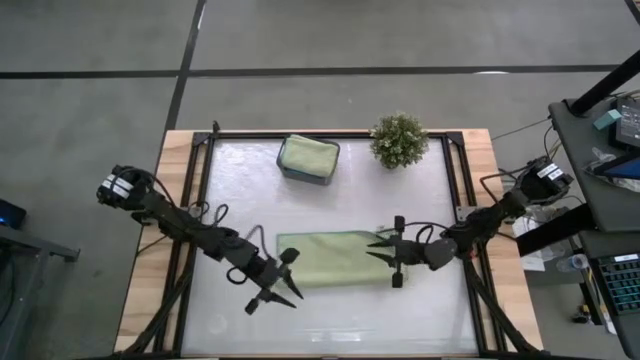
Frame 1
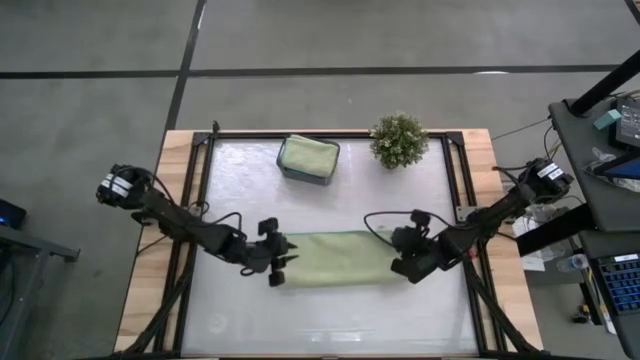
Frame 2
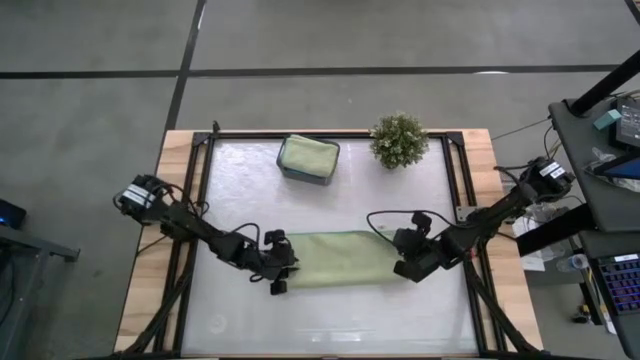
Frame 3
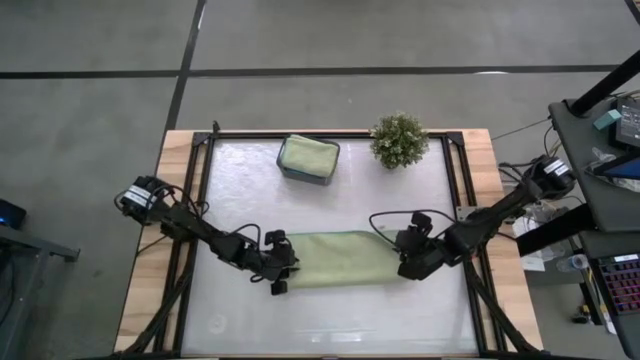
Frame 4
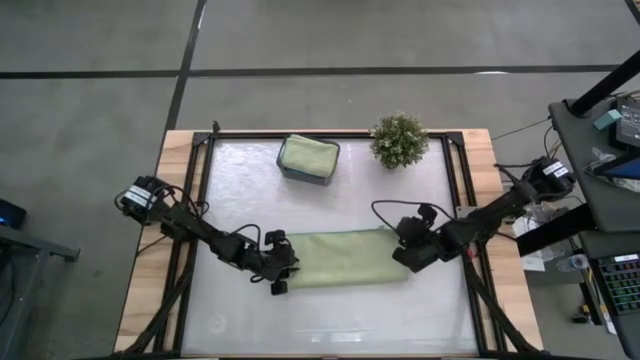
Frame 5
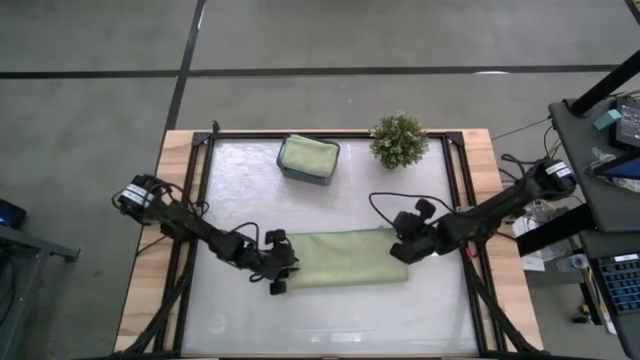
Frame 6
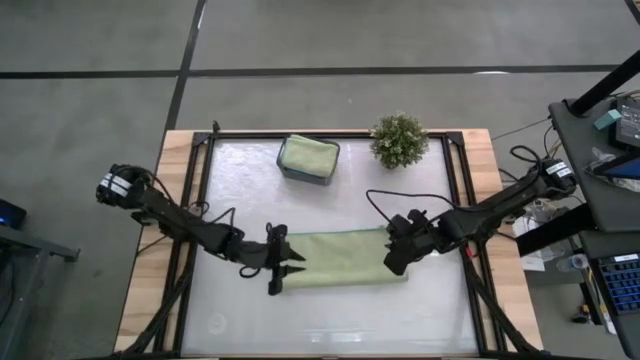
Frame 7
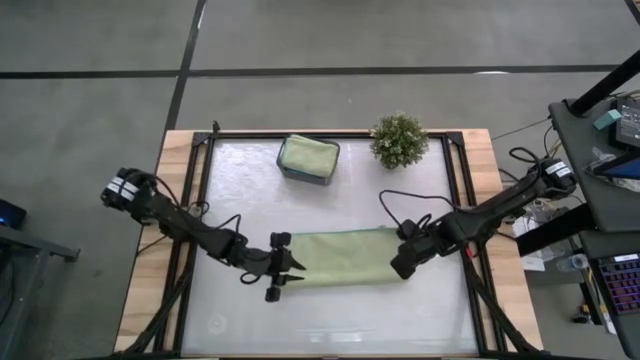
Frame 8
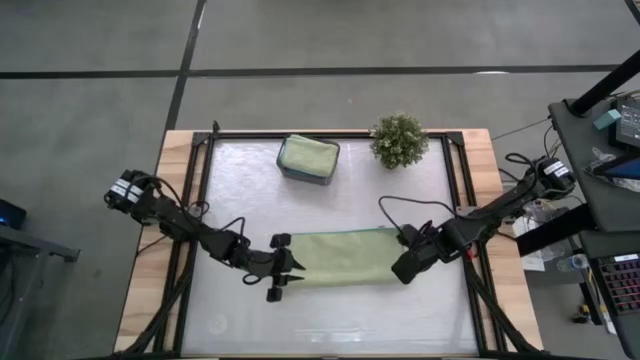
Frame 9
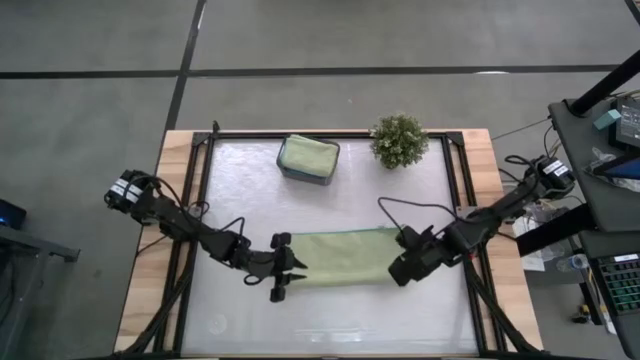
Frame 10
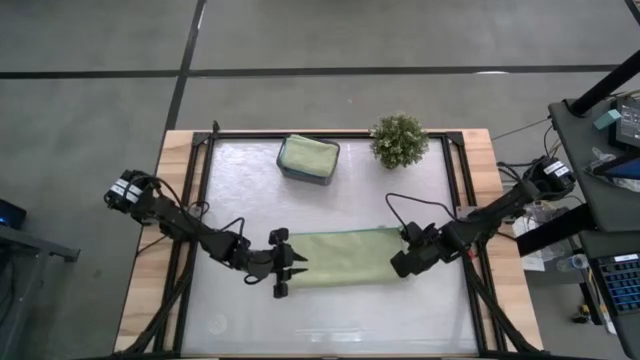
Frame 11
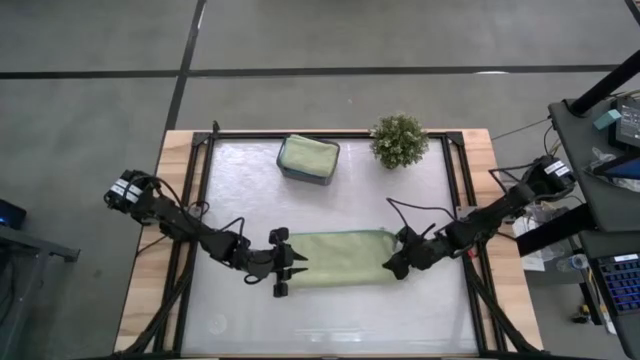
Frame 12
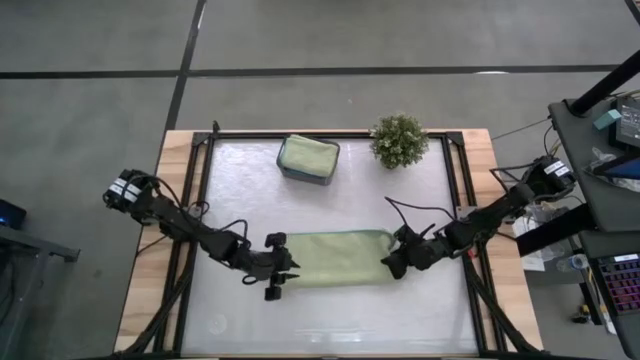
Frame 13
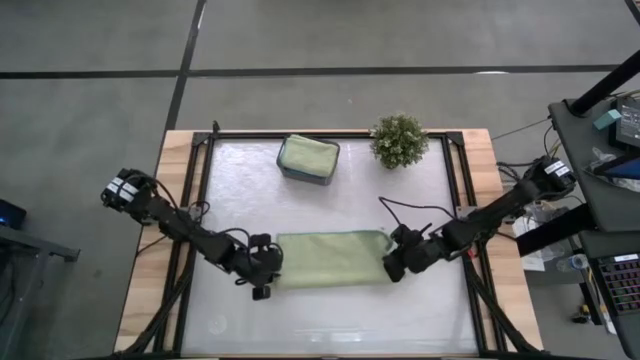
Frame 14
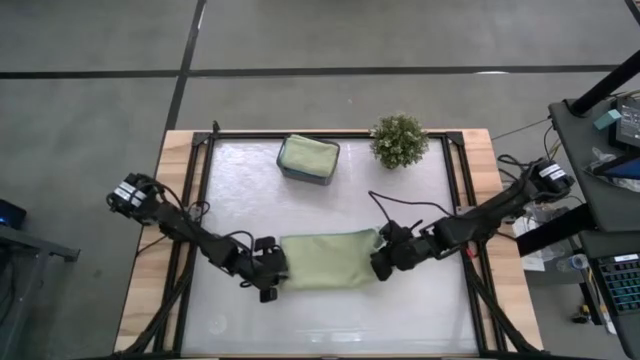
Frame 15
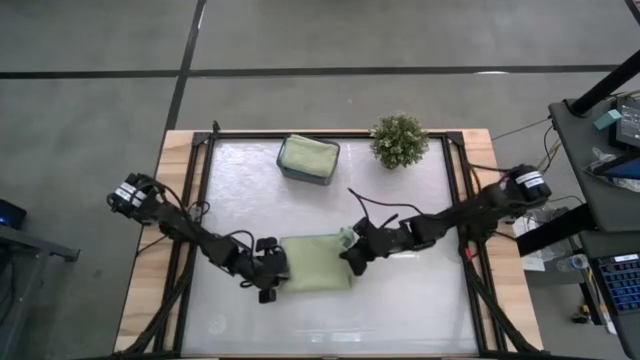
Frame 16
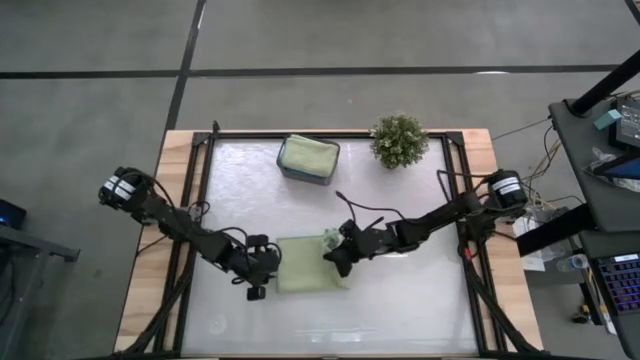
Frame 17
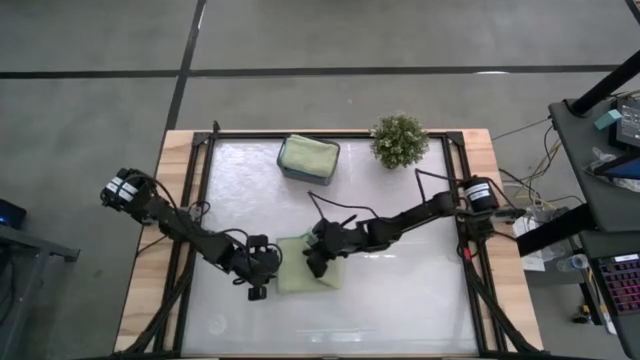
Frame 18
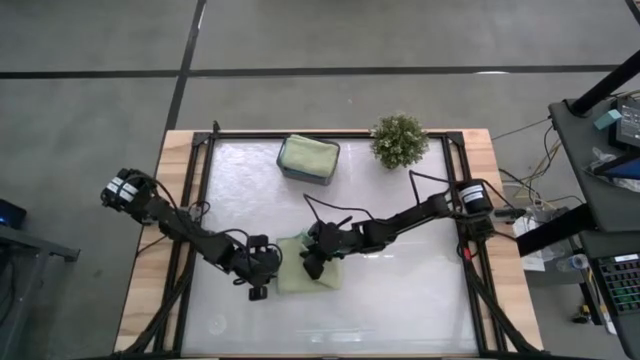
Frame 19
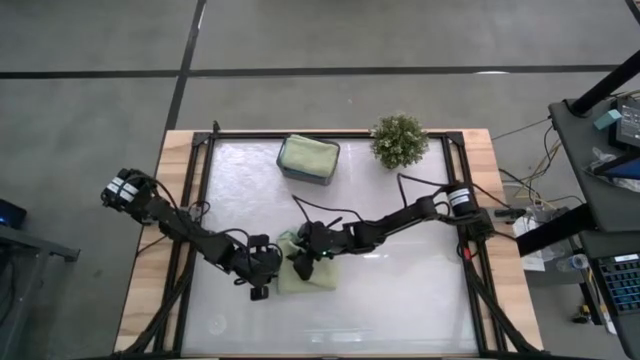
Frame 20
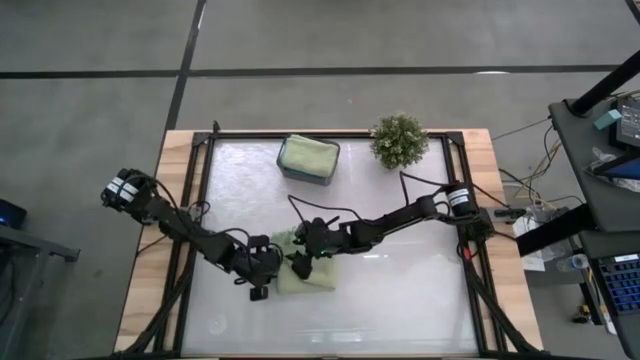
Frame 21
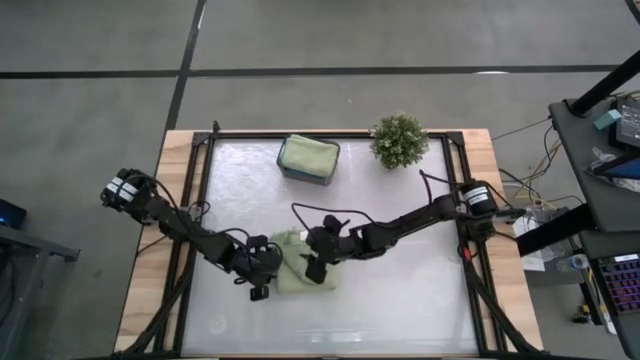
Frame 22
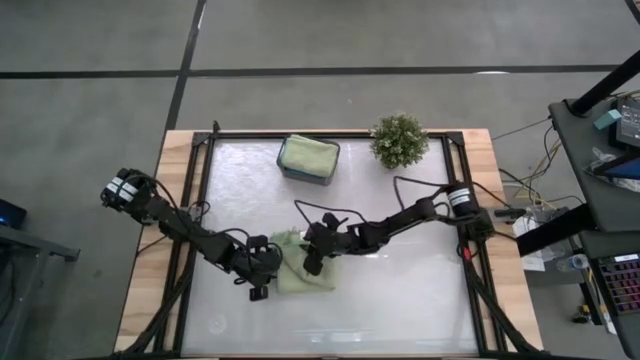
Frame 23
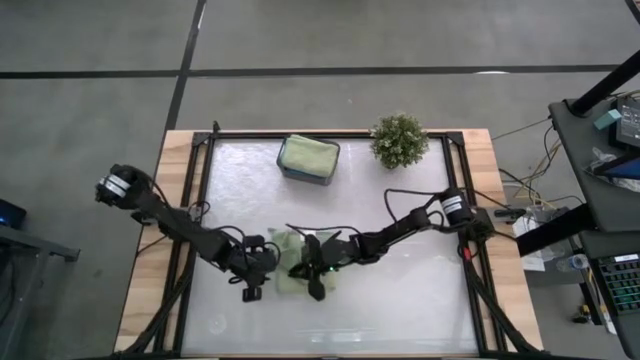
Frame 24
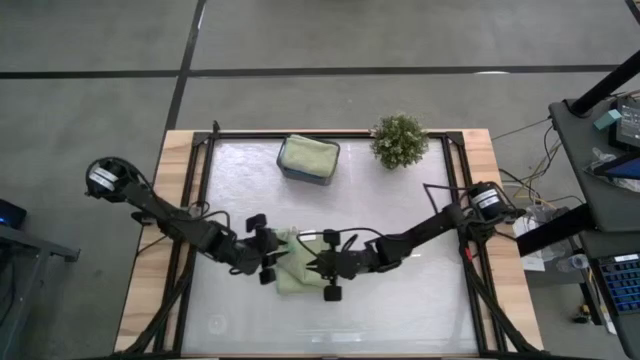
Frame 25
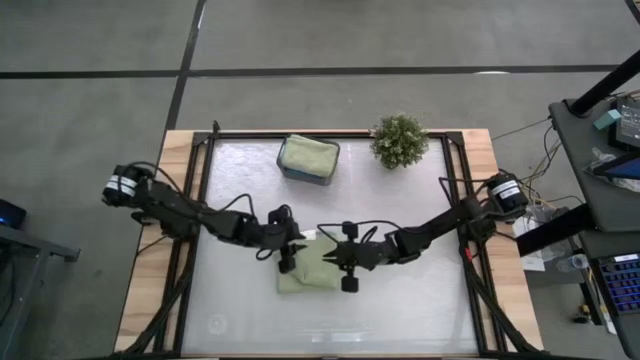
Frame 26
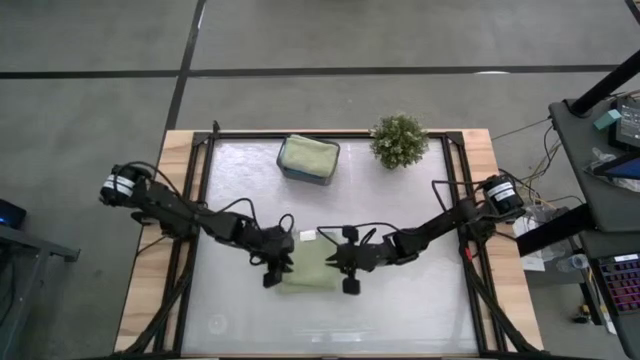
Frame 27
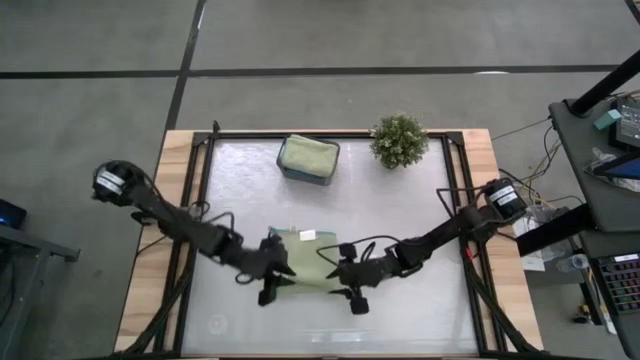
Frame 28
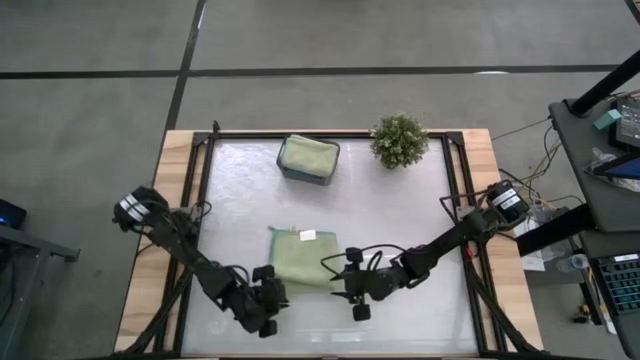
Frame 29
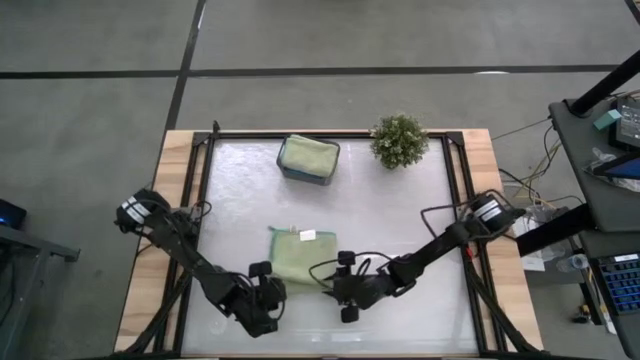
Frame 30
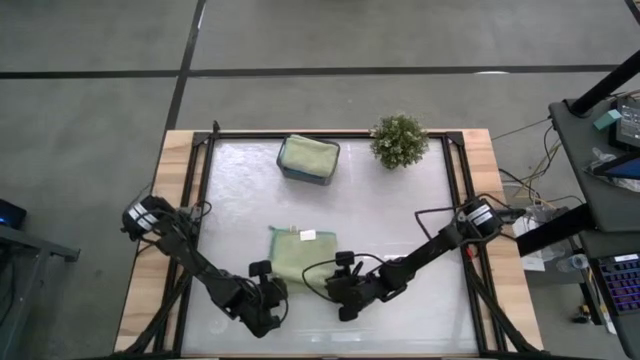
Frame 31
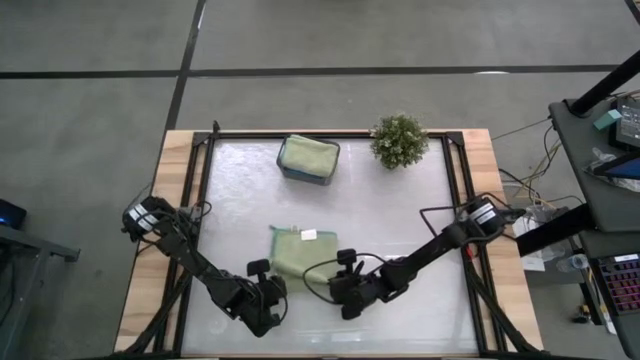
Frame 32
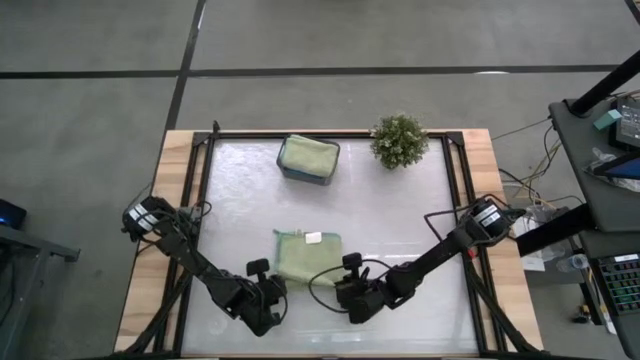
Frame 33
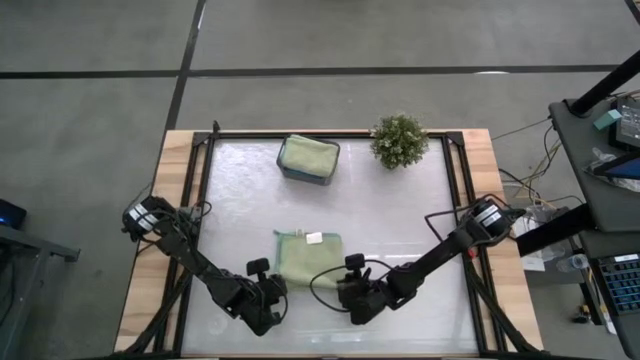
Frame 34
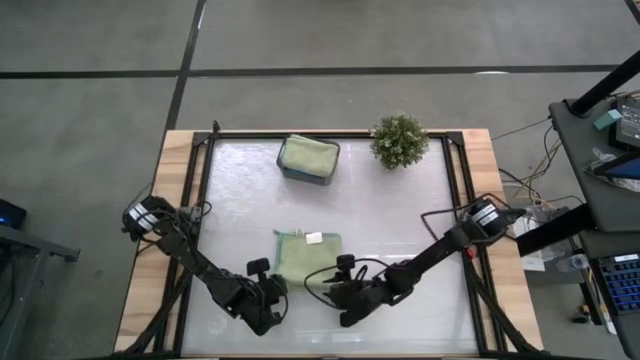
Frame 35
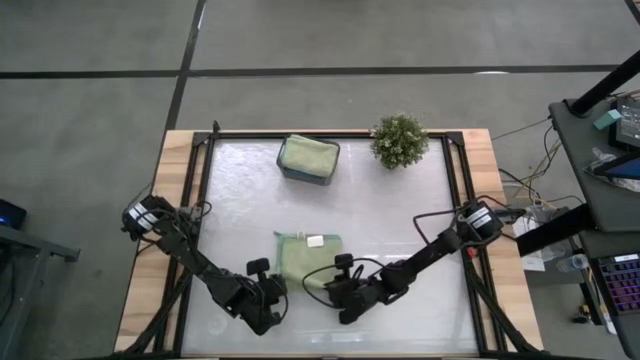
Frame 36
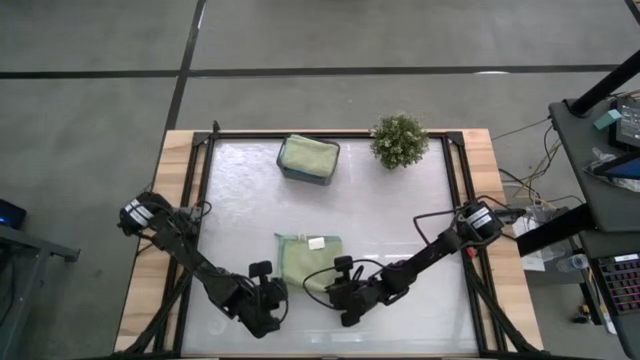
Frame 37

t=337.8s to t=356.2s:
Task: Fold microfiber towels
Fold the green microfiber towel

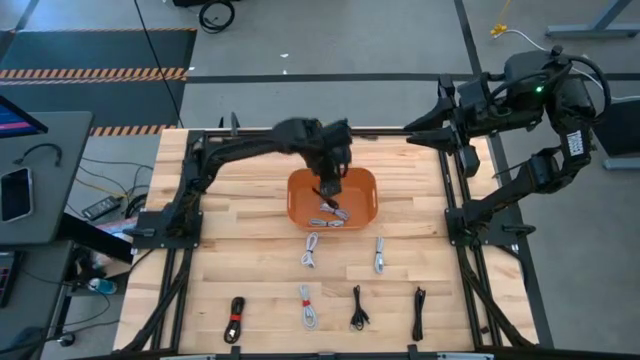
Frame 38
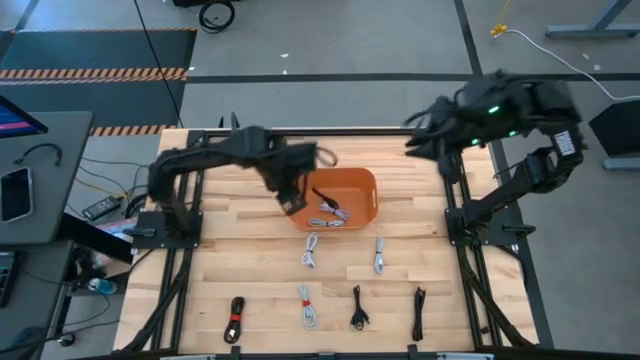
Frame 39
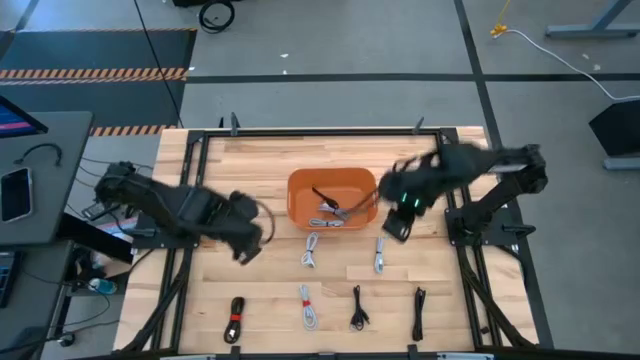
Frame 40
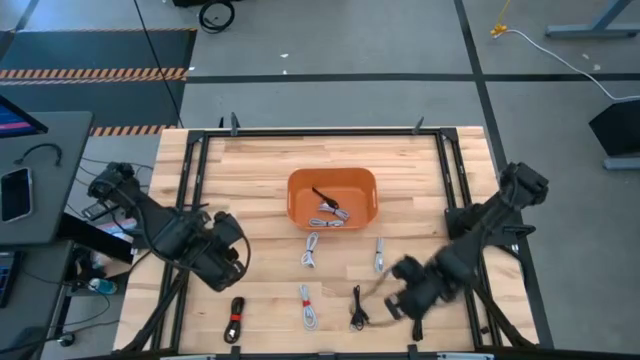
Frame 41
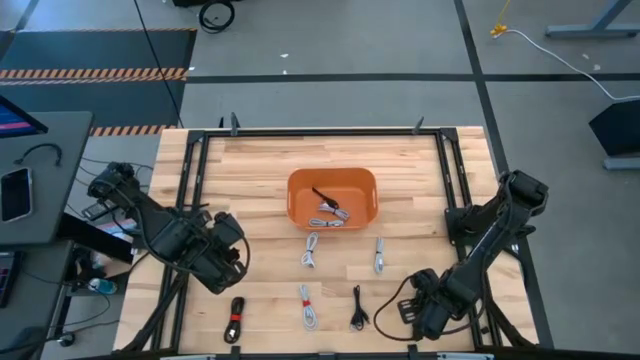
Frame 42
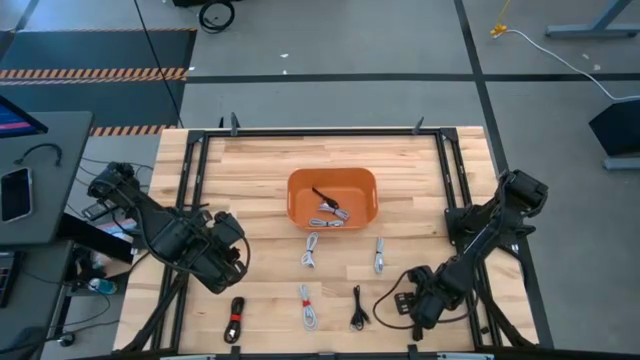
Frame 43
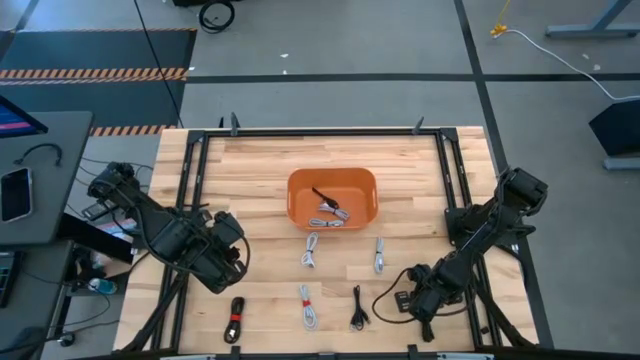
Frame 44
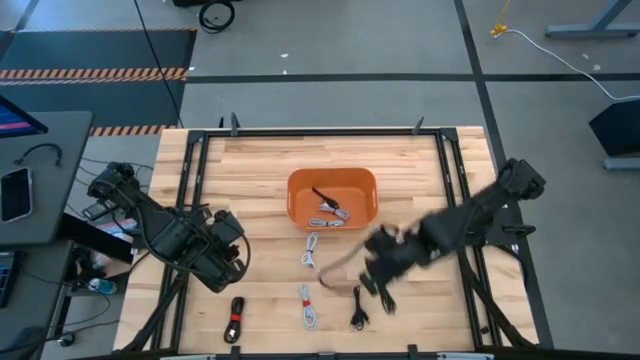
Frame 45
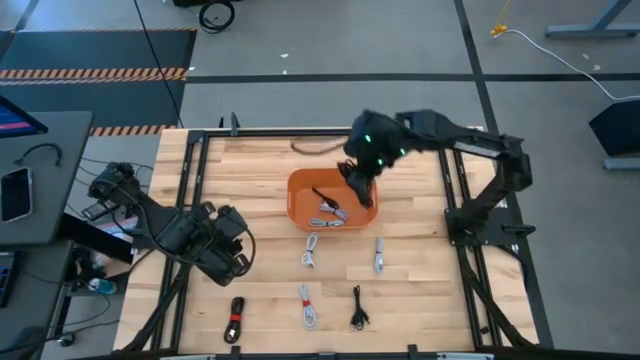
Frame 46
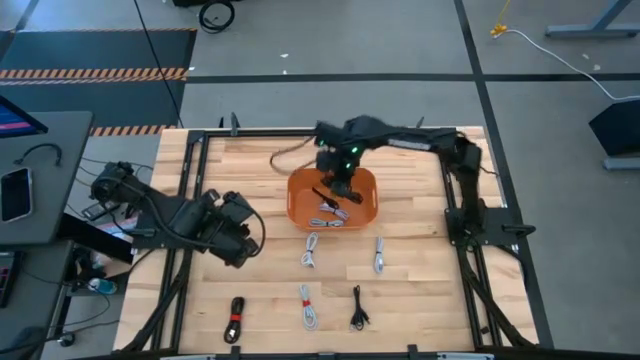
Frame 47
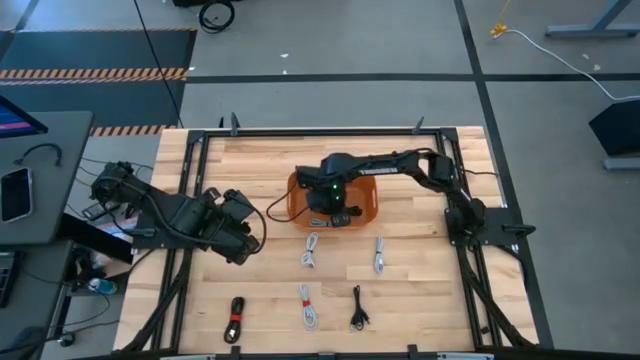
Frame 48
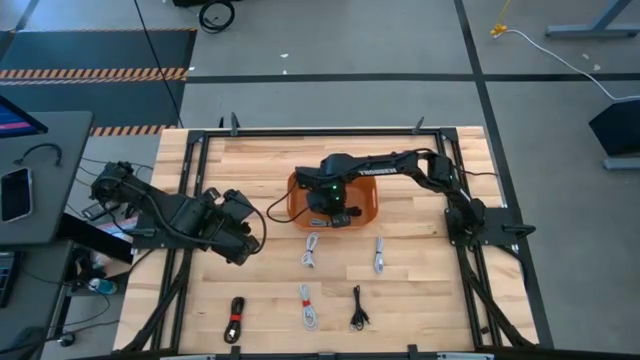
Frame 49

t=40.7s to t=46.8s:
Task: Pick and place USB-C Cables
Put the black USB cable into the orange bin
